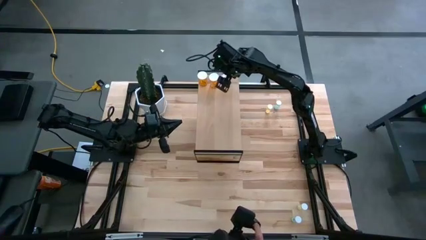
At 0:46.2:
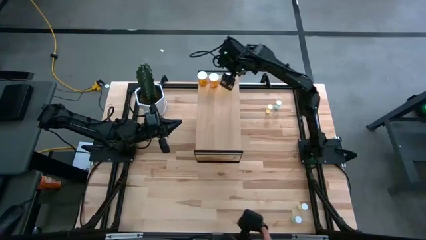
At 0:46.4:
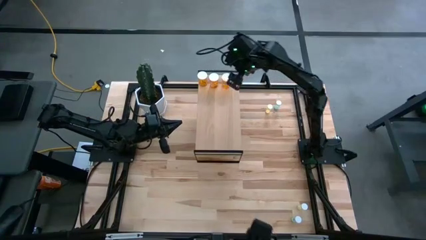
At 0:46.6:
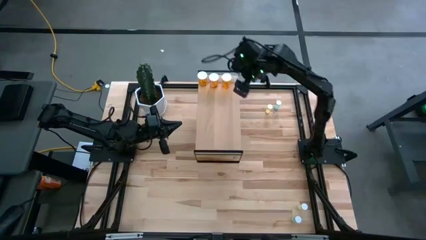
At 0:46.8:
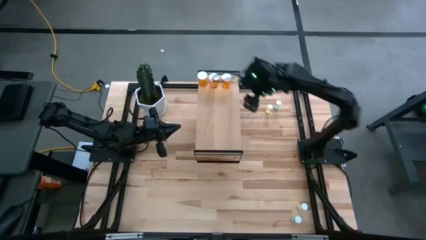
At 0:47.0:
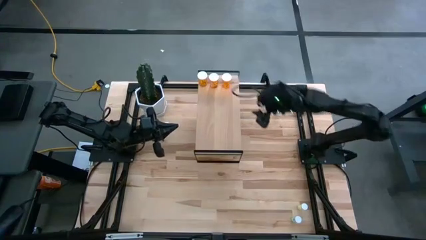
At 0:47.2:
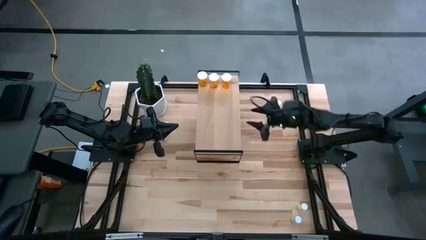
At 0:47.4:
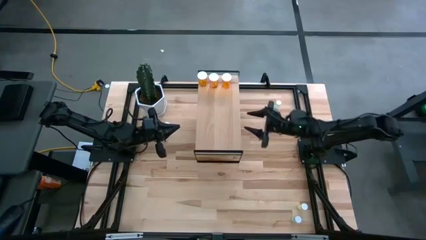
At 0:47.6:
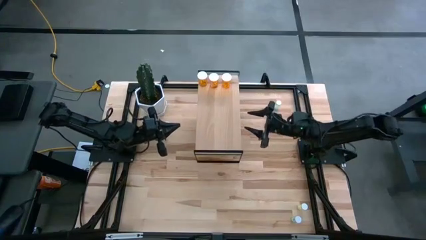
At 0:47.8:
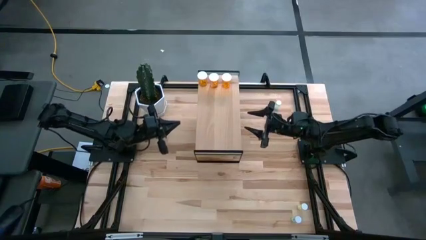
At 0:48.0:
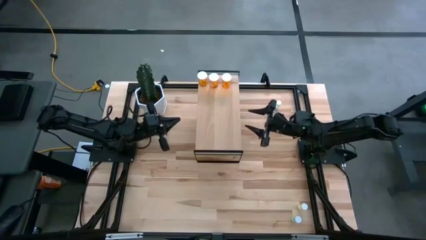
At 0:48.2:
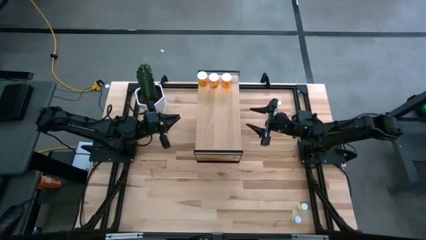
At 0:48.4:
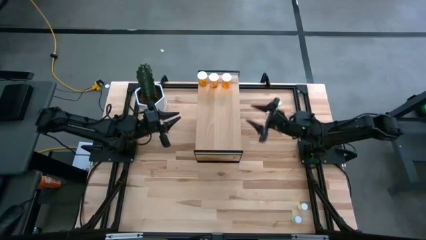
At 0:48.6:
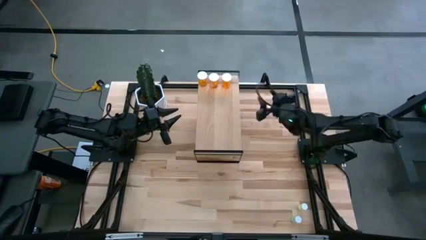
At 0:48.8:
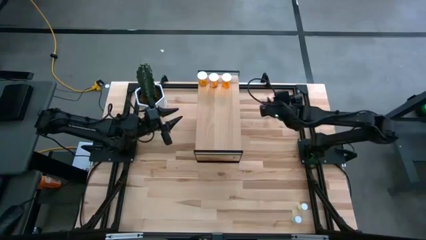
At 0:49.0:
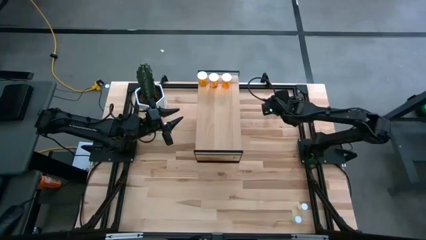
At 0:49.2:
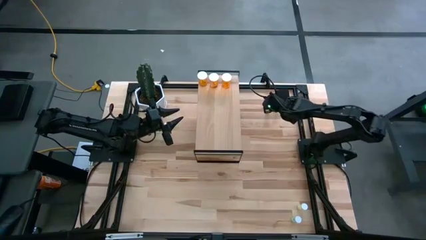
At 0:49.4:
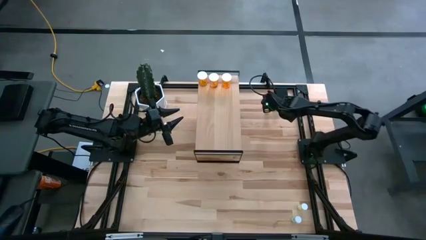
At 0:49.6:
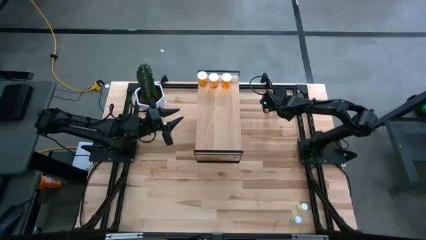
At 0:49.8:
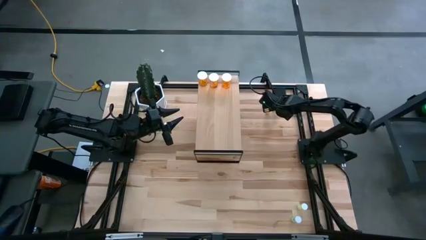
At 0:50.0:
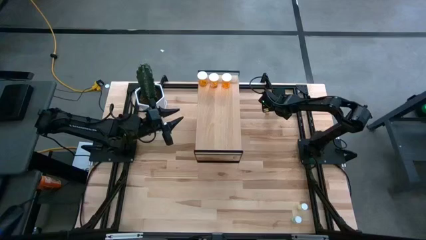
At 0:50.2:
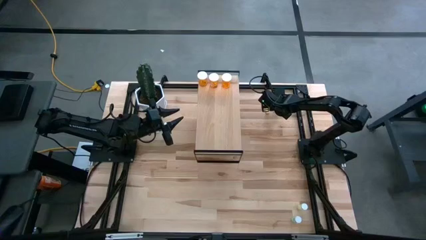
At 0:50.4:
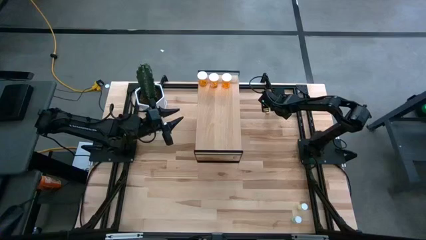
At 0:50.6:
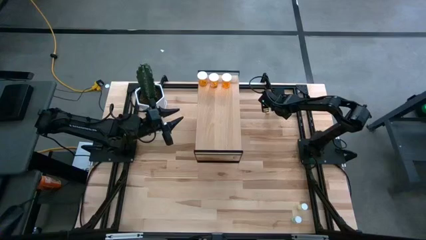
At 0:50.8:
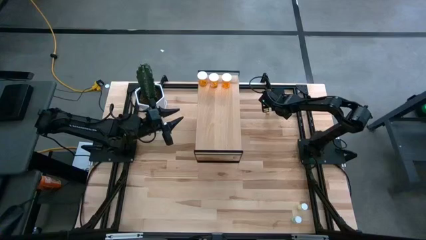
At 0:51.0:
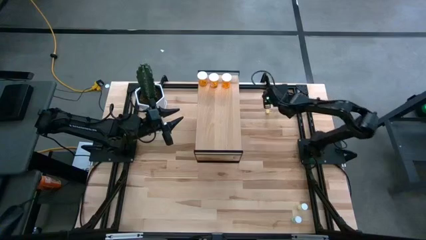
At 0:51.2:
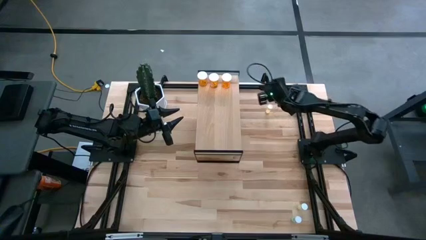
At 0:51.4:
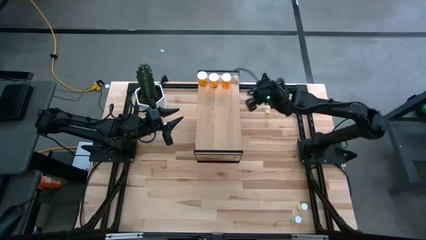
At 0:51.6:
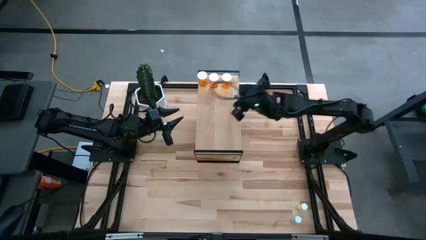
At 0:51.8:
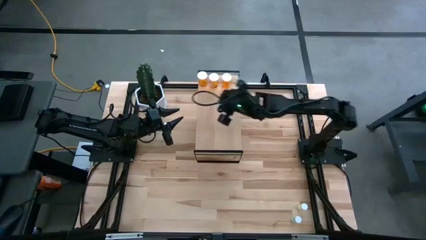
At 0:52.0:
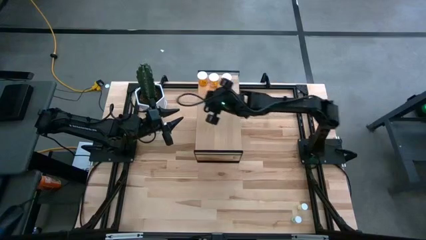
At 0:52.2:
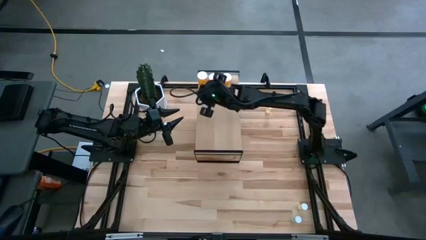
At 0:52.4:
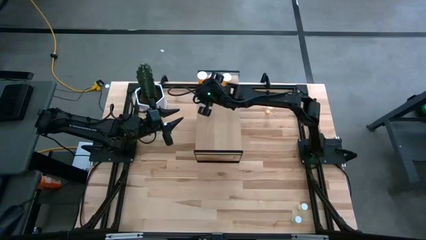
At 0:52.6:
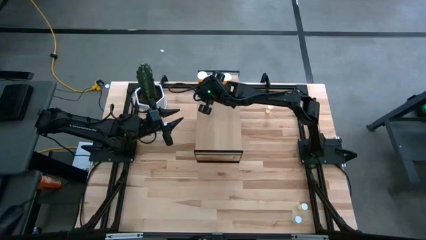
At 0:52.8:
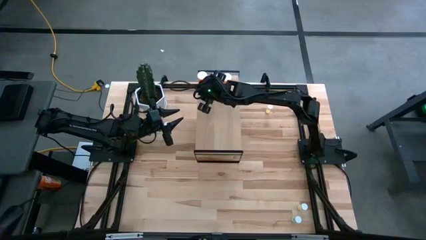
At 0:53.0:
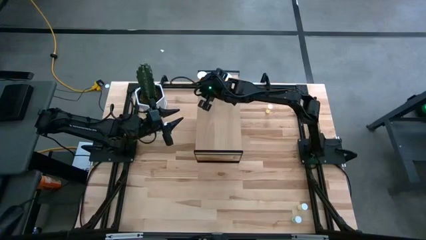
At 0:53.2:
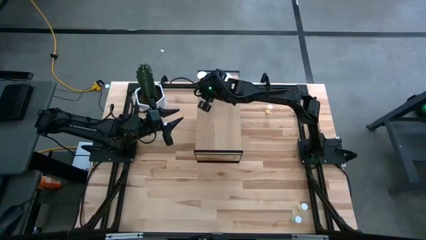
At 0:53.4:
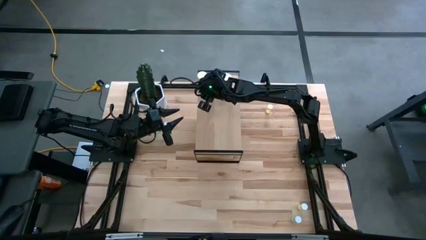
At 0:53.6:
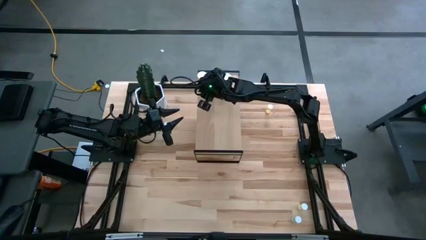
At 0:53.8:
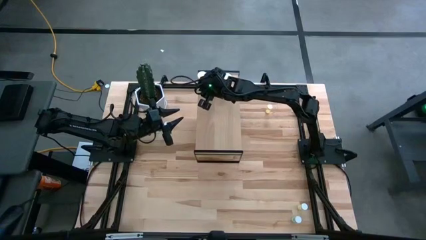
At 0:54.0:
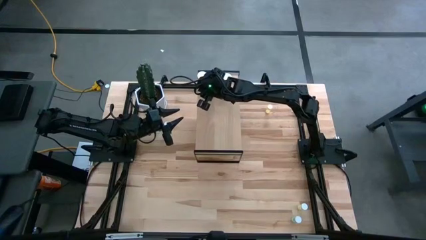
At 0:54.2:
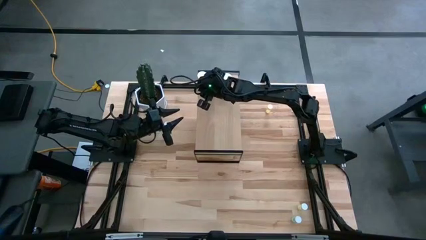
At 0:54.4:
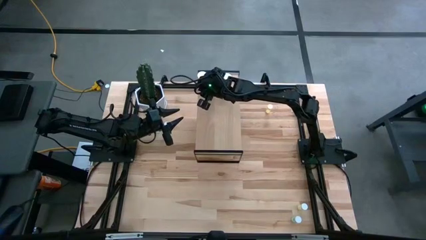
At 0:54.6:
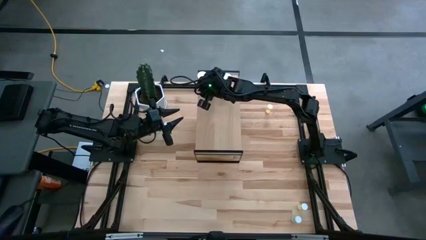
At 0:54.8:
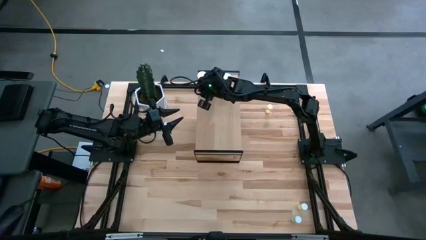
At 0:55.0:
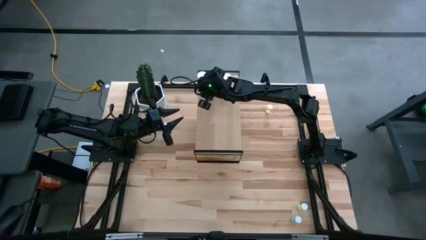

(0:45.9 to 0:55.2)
Task: Pick and place medicine bottles onto shelf by color
Put the top green pill bottle on the shelf

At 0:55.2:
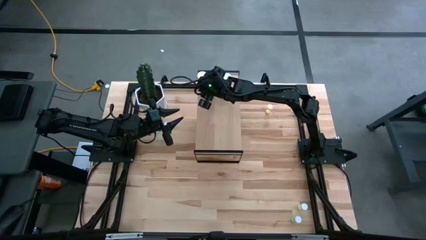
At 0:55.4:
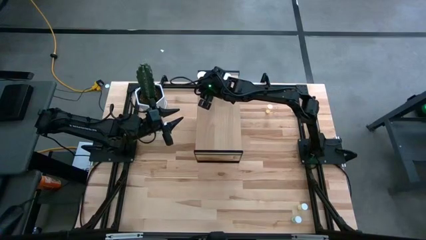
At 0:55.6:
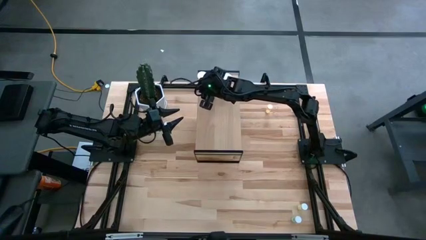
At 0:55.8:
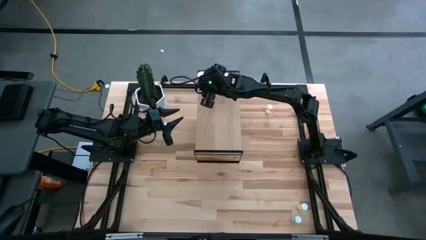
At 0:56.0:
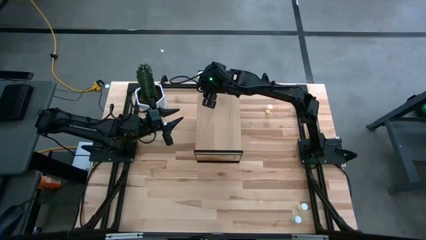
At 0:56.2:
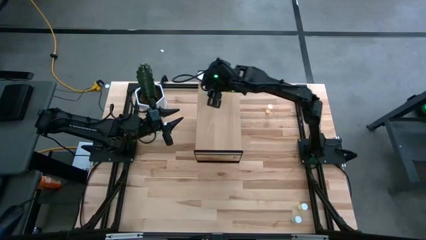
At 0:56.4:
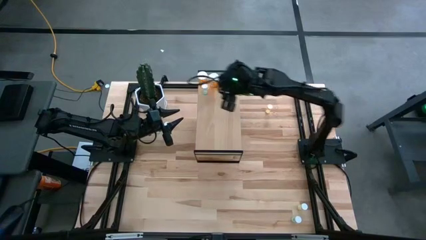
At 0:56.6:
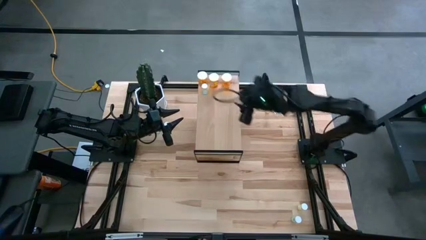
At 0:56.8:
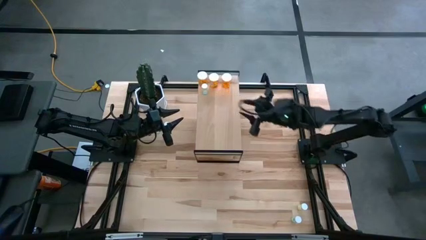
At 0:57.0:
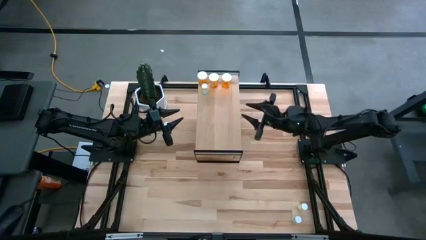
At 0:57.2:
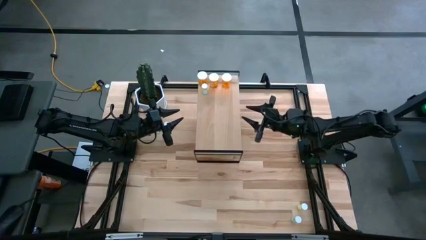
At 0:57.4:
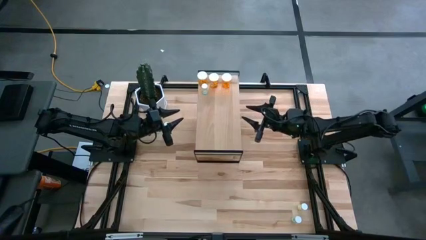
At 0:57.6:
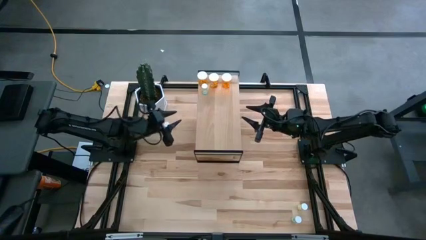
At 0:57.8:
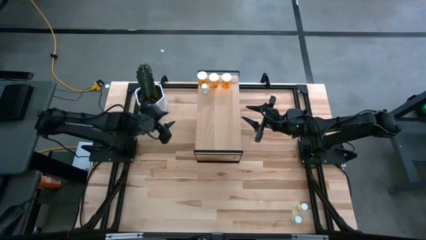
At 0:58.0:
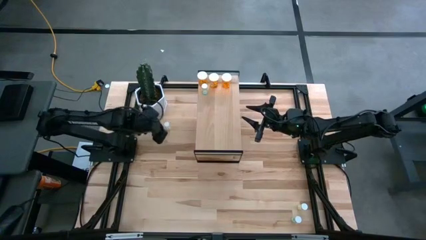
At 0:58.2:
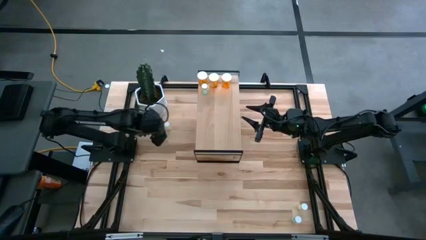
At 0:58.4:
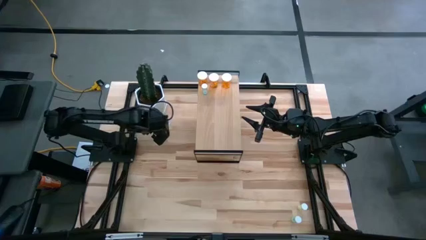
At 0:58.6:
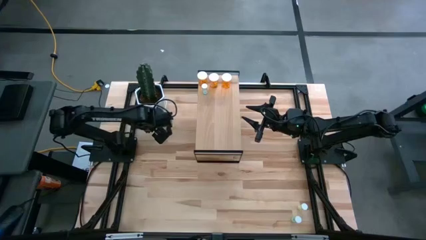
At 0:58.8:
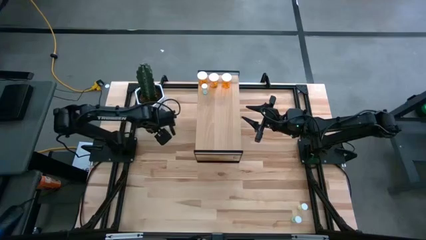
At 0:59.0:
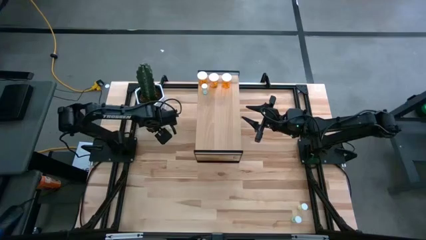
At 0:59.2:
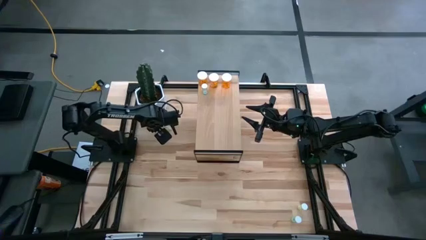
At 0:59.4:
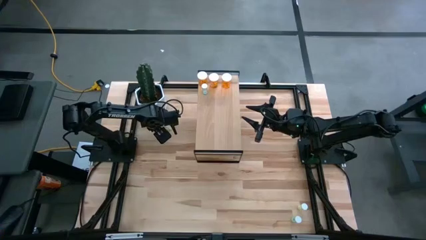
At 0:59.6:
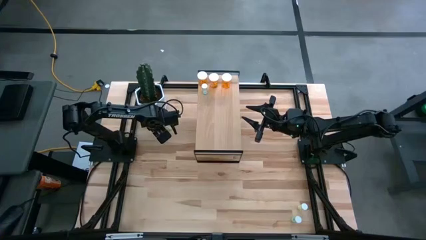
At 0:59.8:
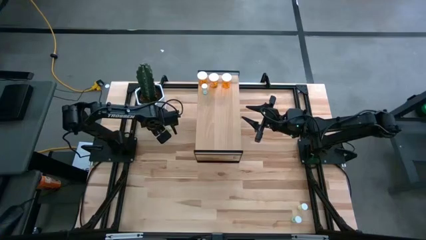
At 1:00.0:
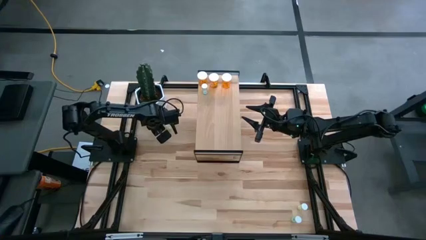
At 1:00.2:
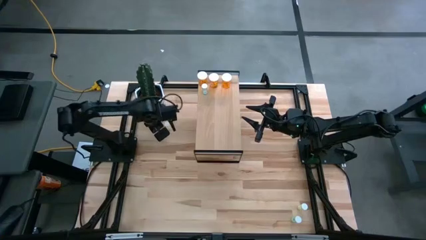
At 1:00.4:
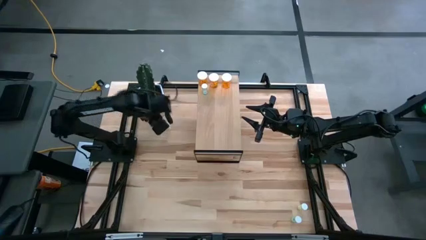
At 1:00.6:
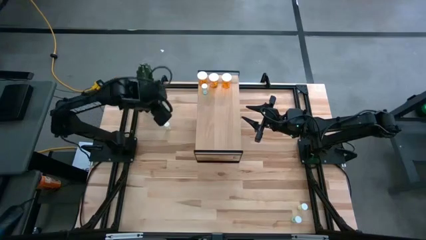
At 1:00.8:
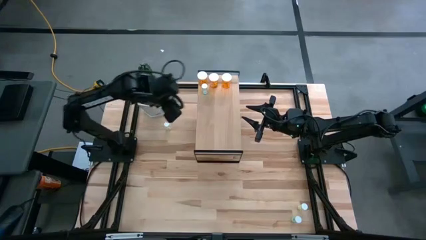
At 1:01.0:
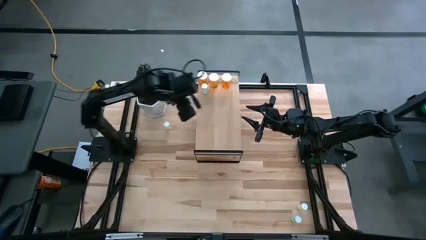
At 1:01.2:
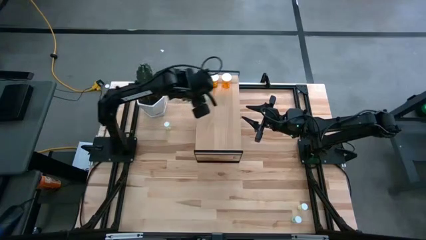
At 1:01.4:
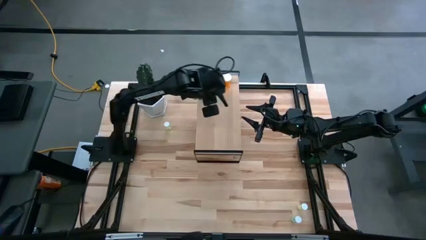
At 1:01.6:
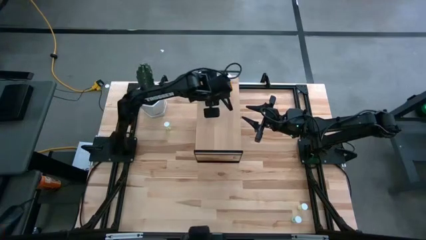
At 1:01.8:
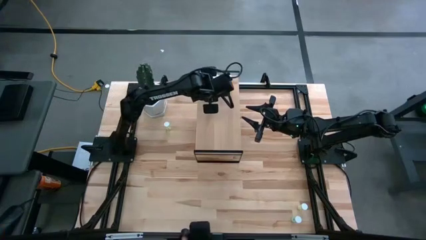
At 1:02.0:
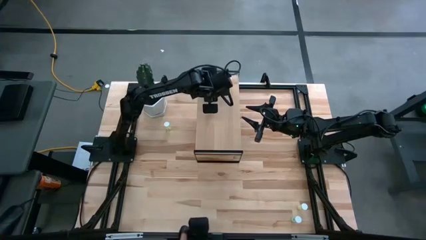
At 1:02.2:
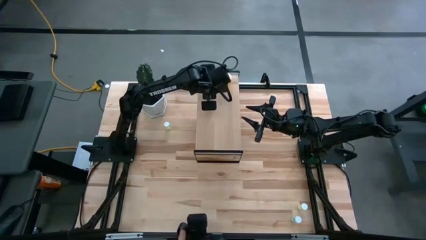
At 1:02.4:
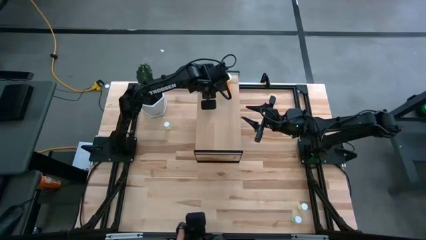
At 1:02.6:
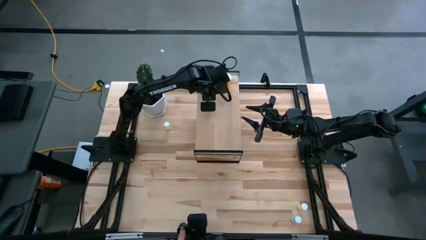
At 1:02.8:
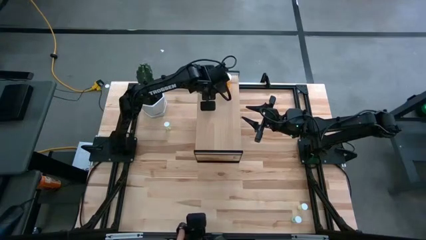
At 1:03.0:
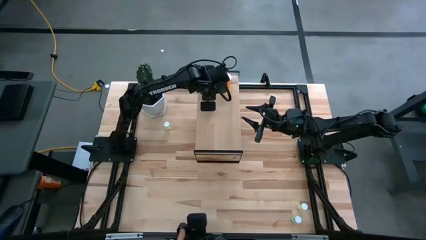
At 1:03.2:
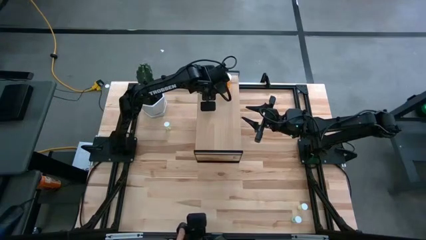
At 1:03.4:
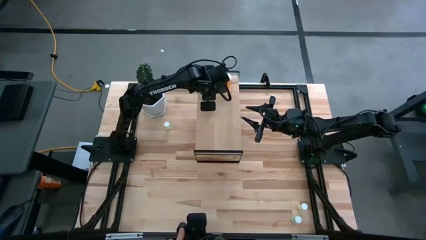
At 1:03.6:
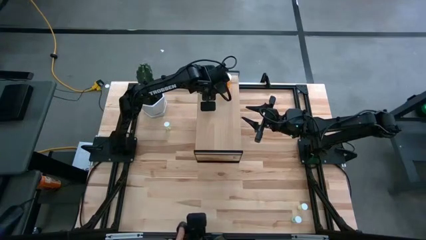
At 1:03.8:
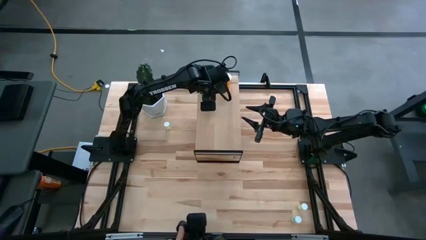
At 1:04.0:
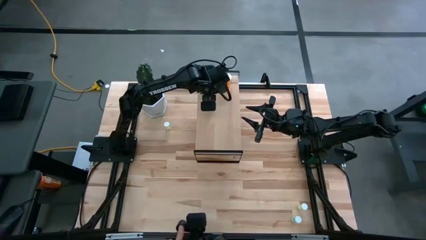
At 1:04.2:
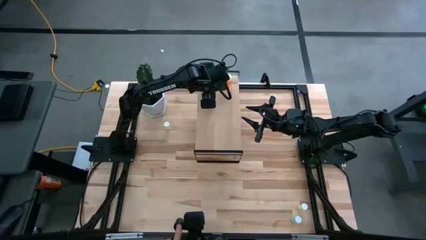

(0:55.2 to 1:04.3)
Put the top green pill bottle on the shelf aligned with the other green pill bottle
